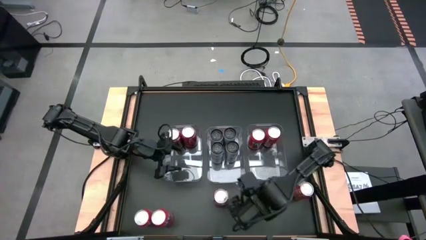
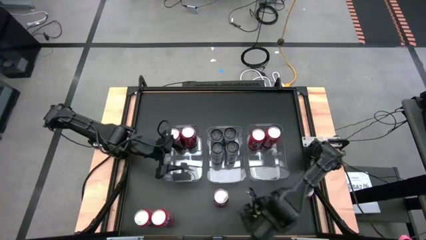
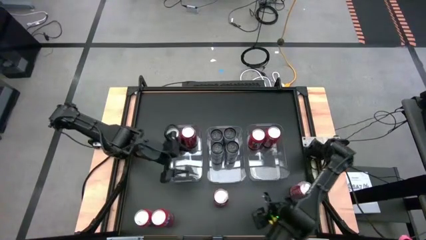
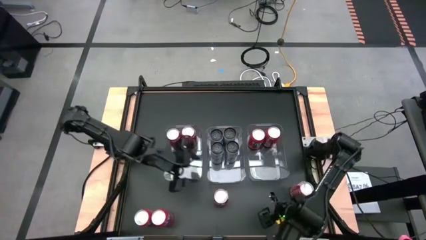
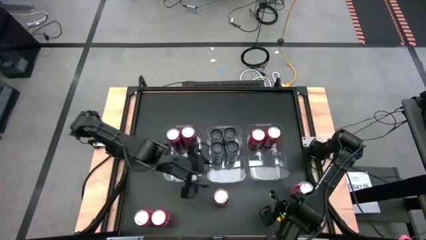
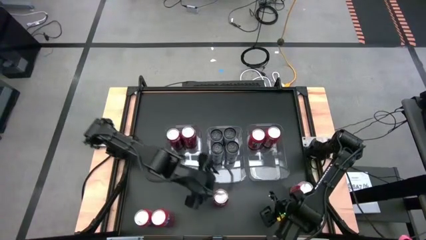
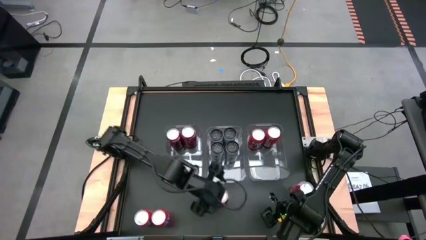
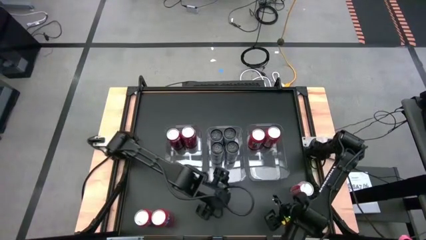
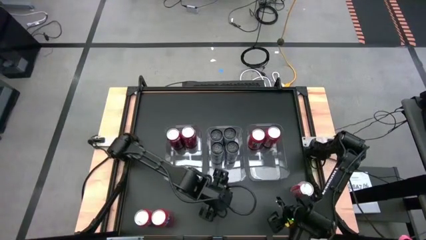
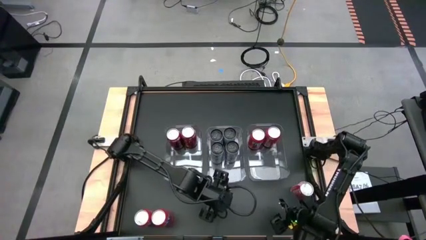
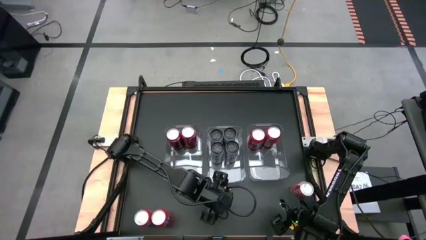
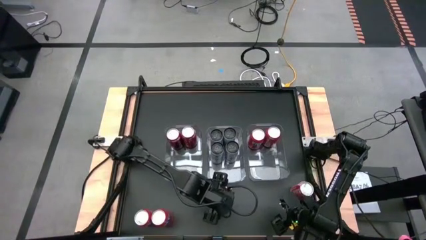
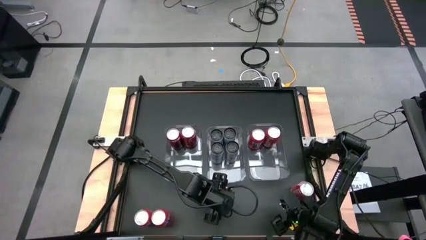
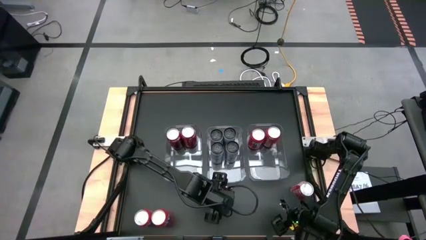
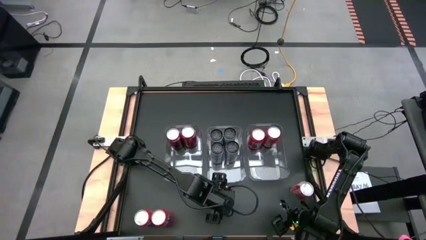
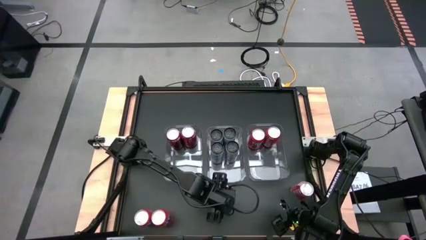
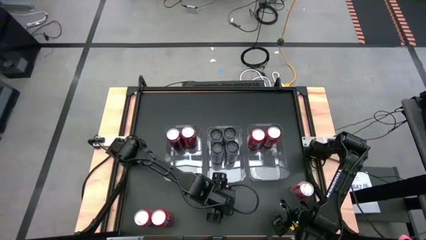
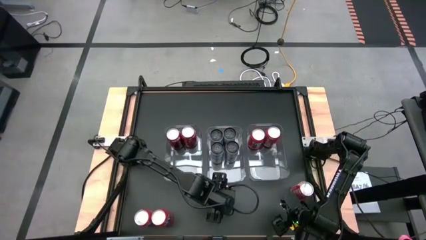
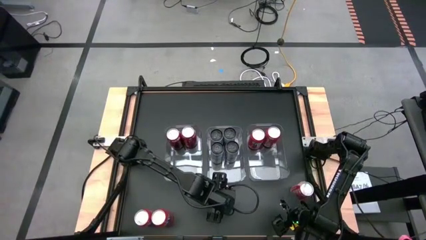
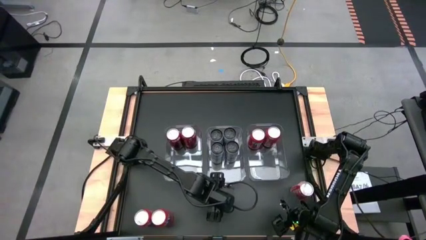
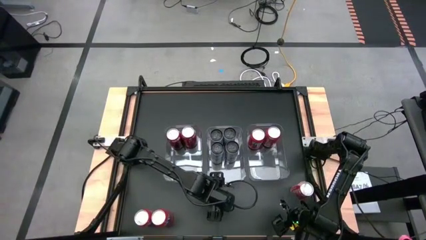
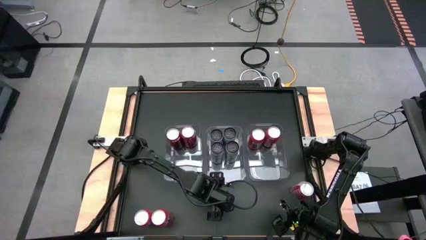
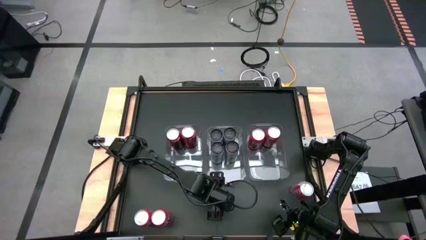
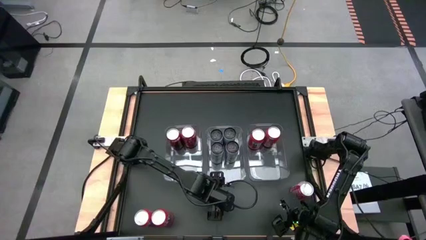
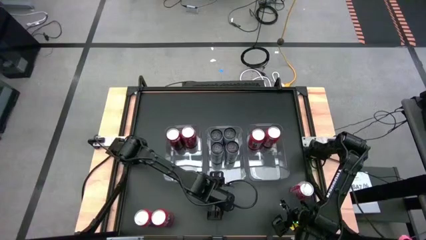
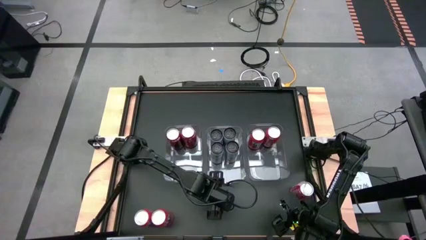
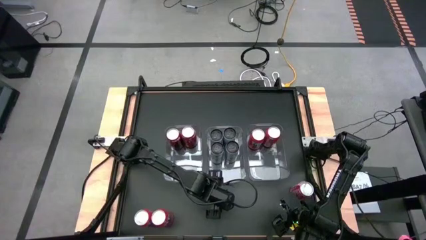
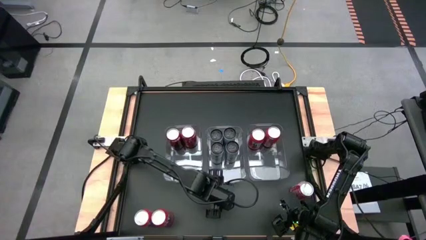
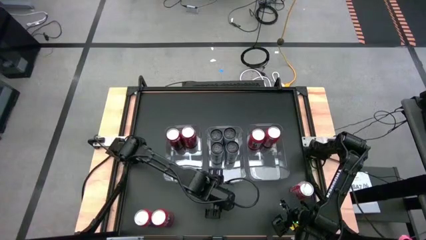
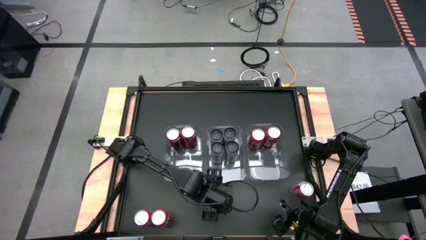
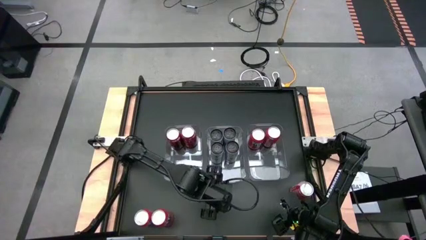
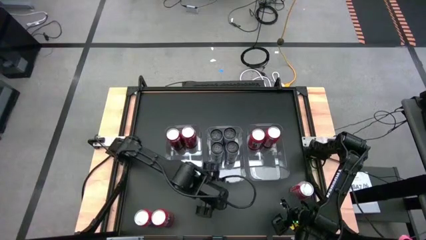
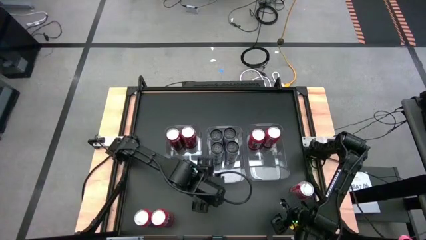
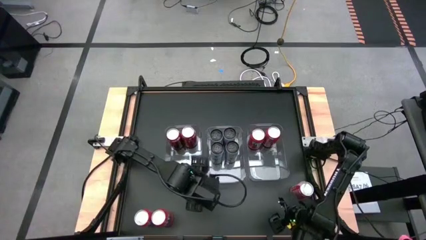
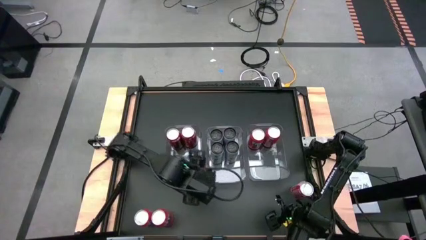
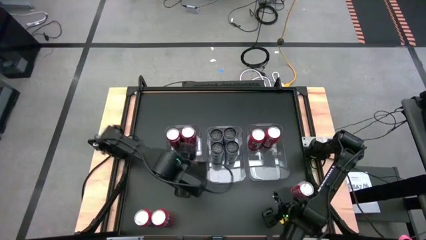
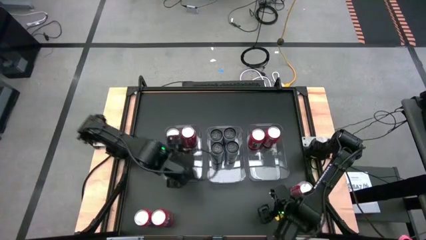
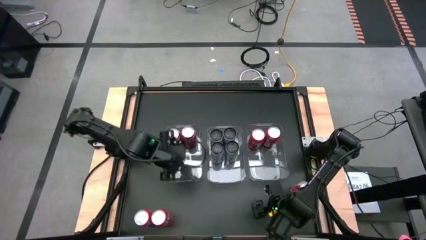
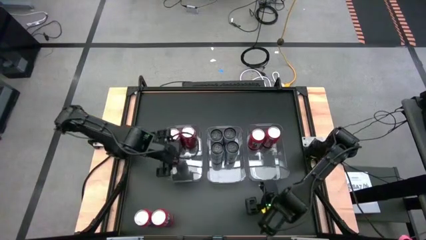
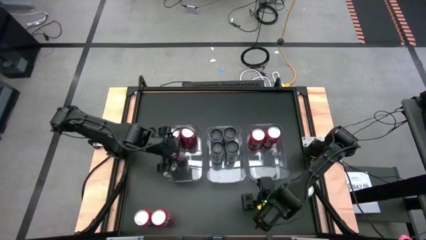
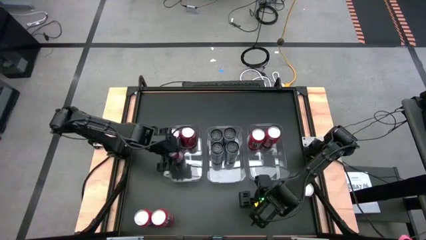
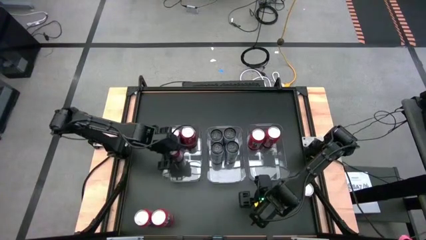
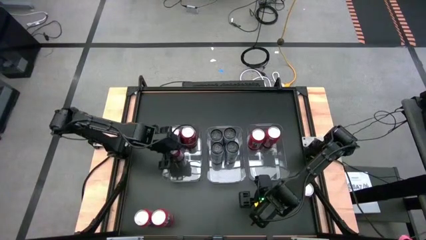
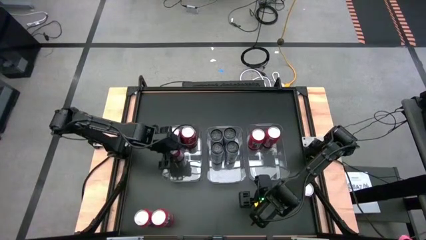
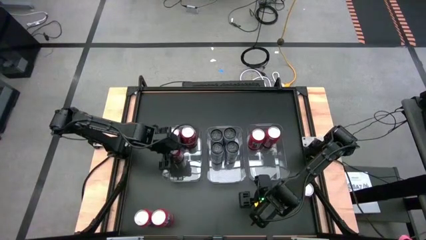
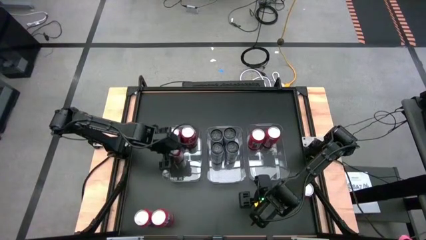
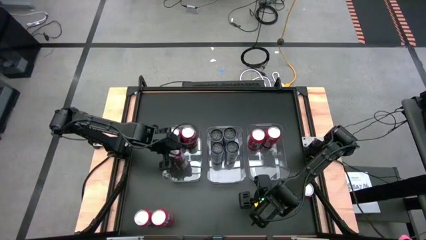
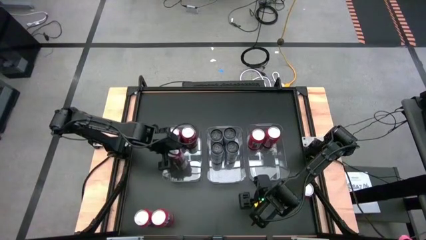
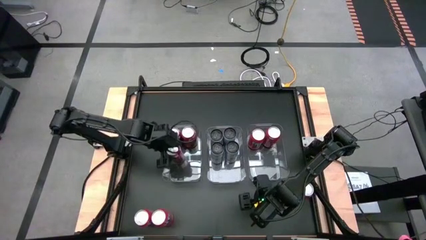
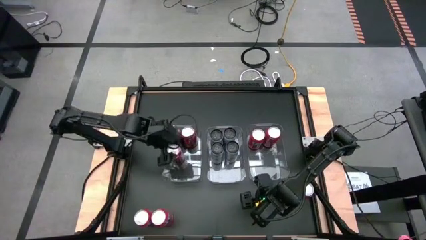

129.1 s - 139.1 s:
Task: Sort soda cans
Put the left red soda can into the left transparent bin

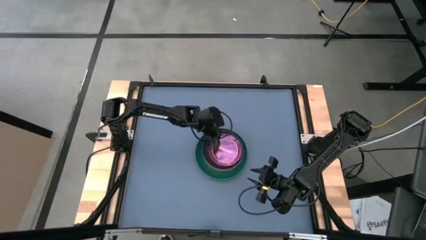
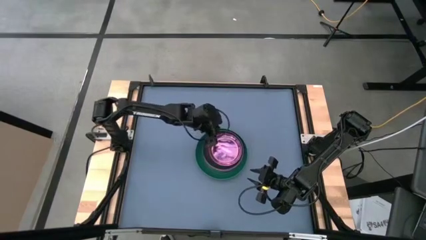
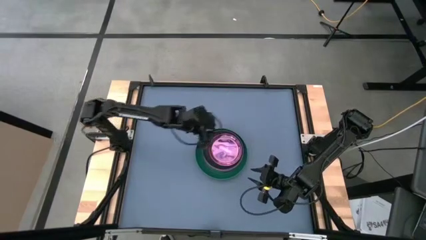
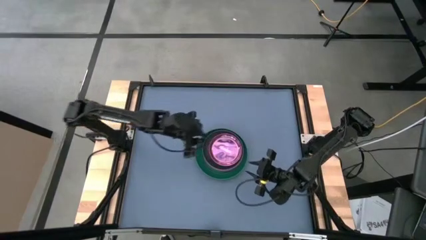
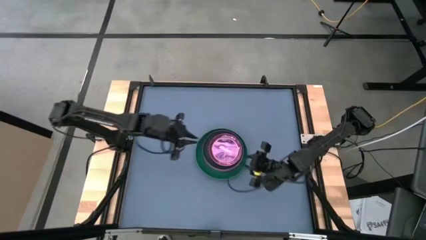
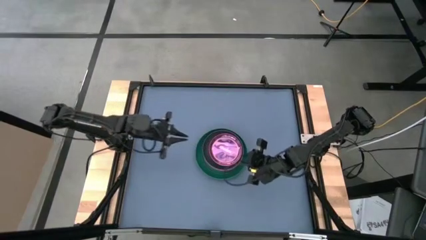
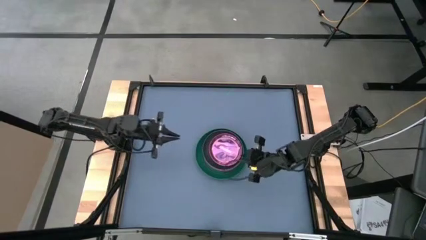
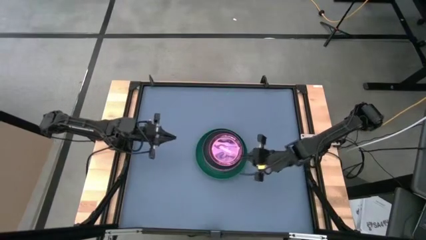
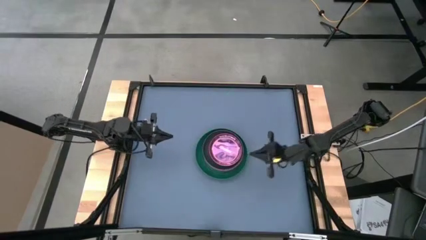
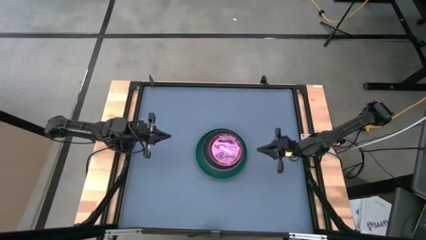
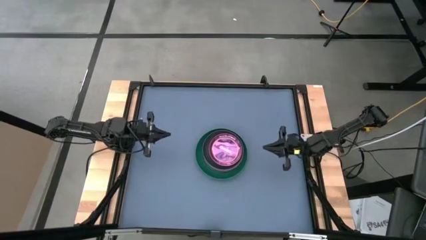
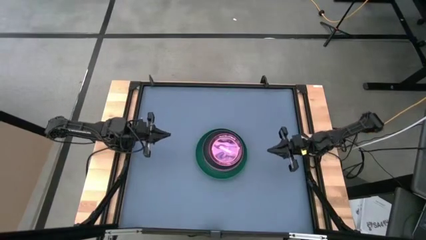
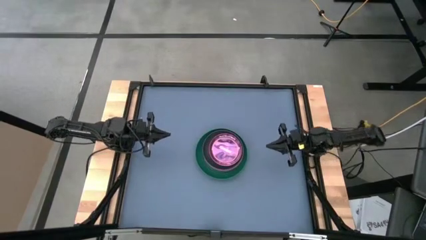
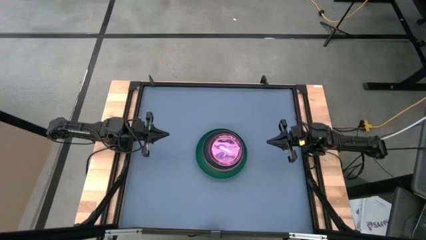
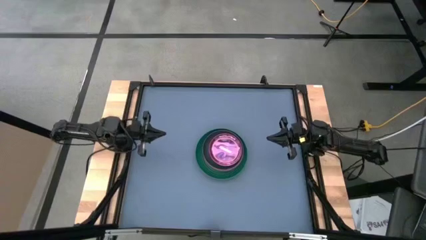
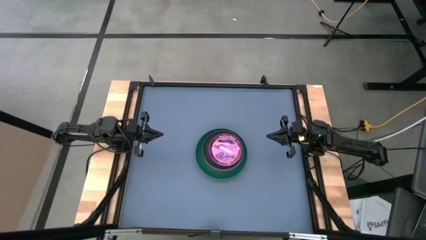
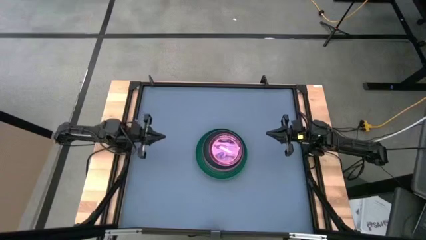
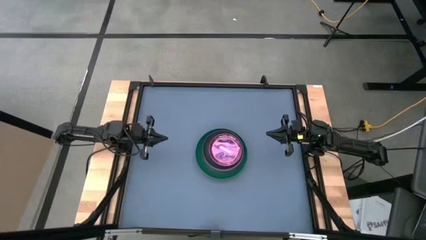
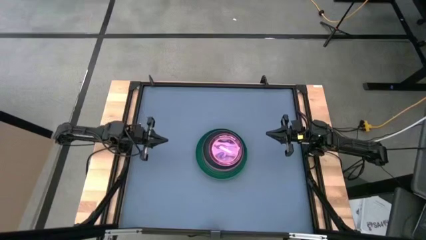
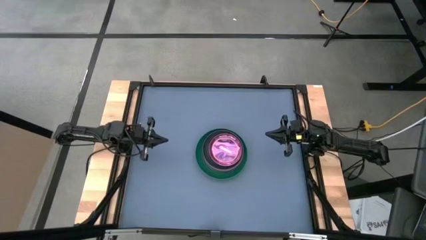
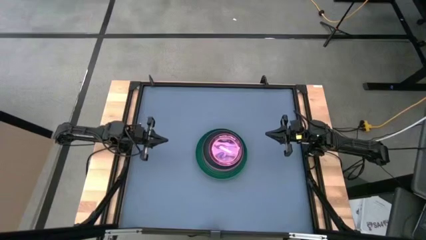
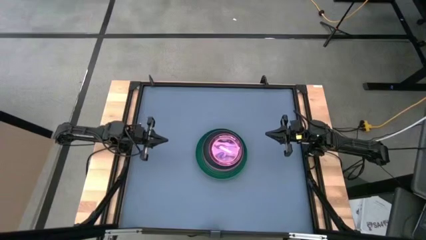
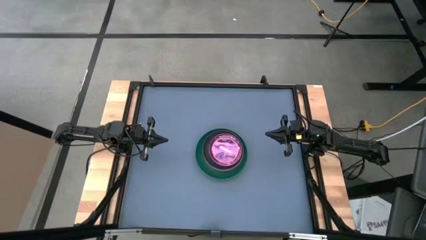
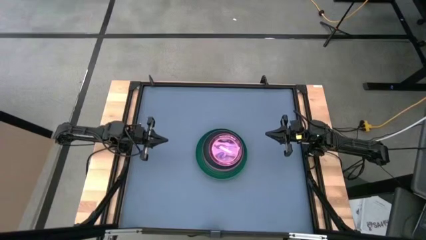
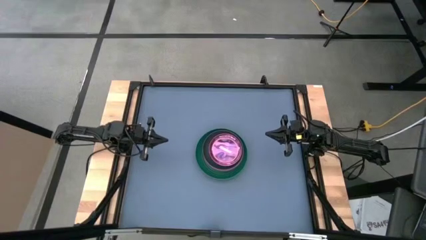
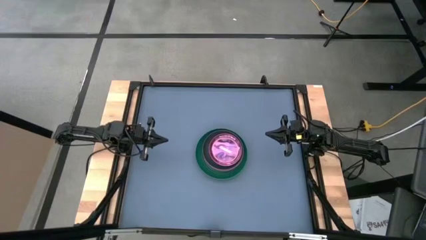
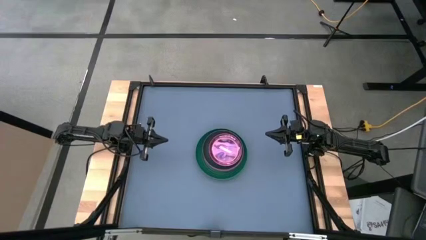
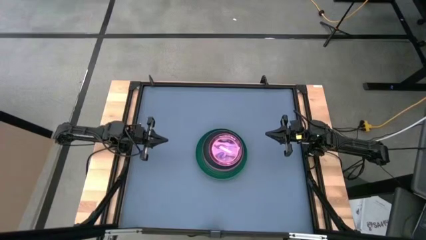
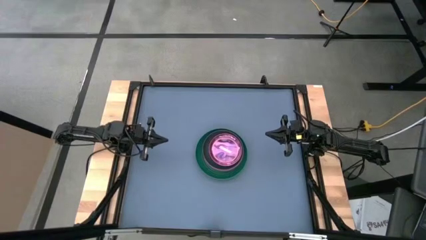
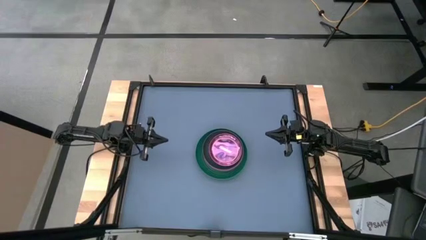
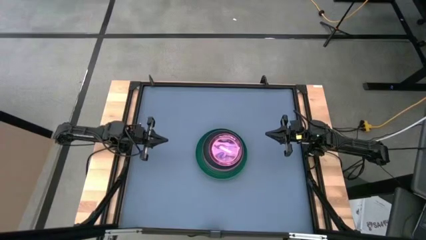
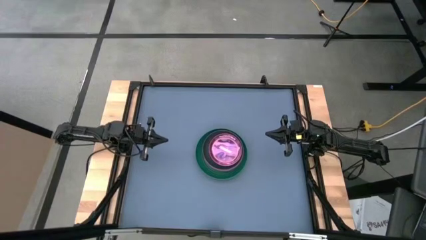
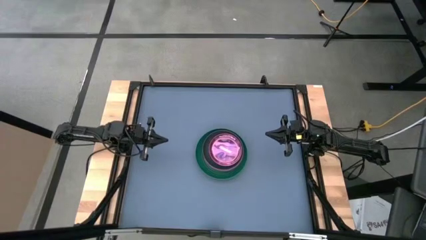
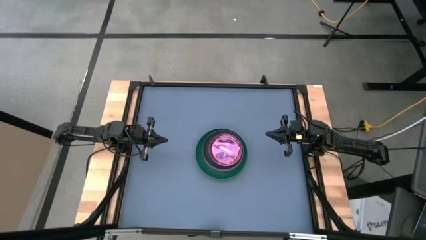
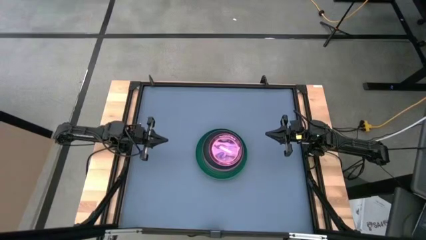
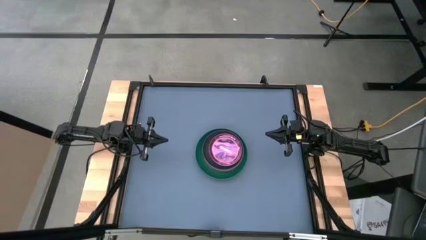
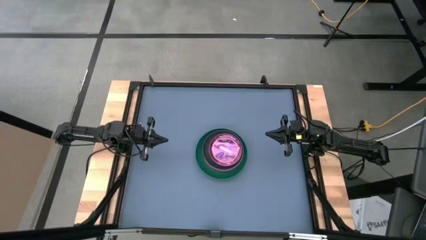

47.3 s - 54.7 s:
Task: Stack plastic plates
Return to Home Position
